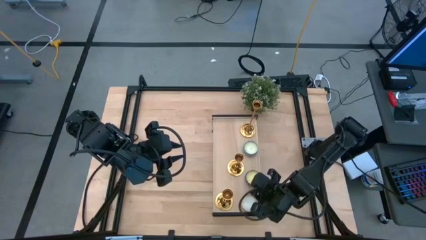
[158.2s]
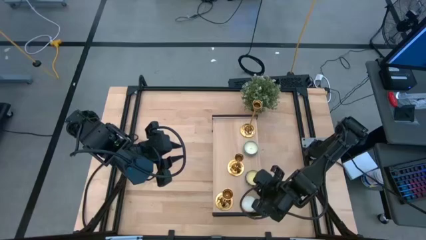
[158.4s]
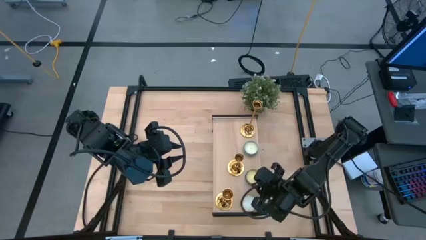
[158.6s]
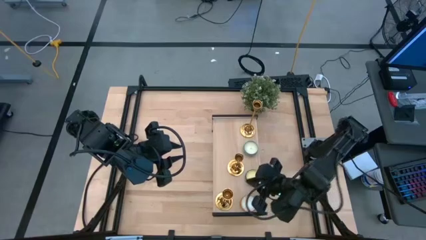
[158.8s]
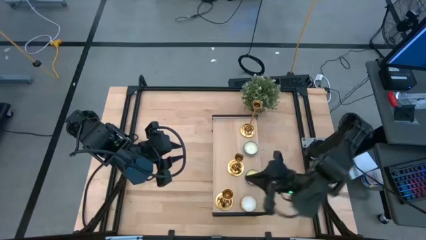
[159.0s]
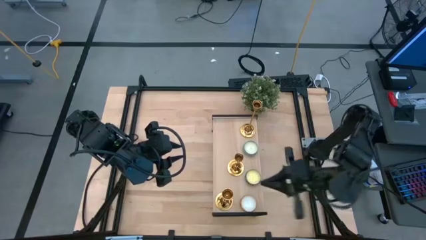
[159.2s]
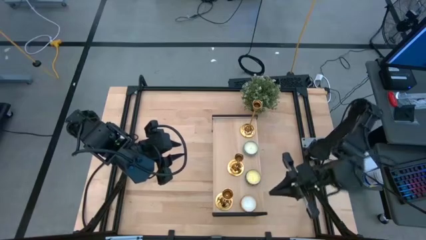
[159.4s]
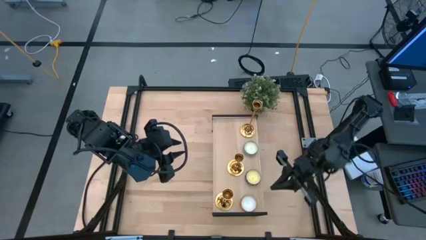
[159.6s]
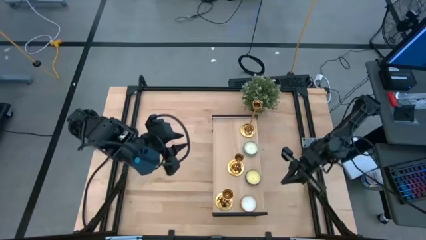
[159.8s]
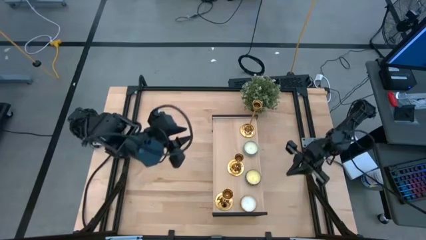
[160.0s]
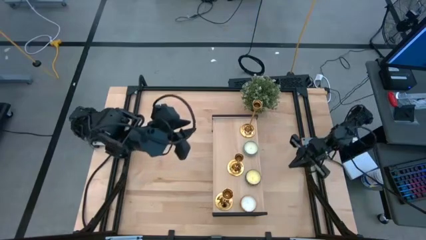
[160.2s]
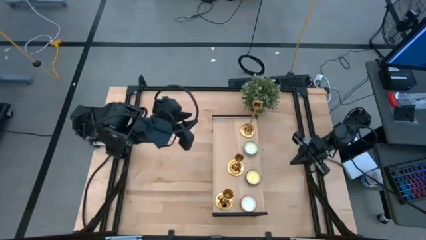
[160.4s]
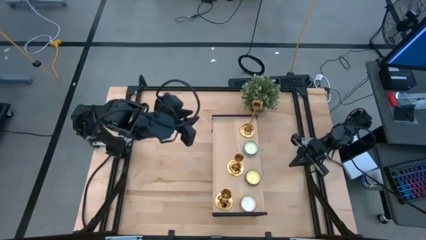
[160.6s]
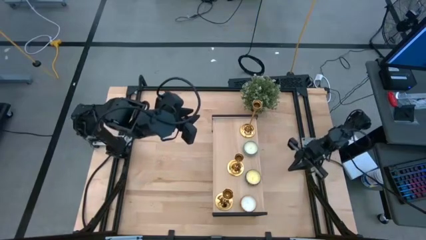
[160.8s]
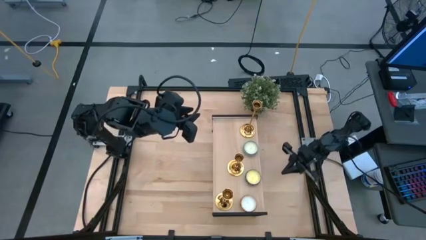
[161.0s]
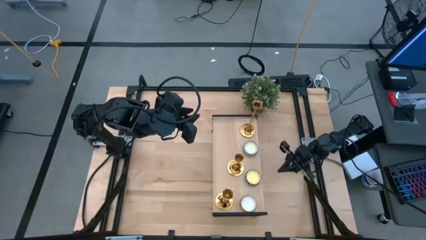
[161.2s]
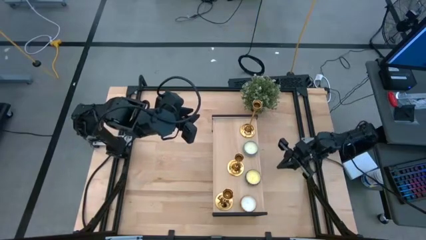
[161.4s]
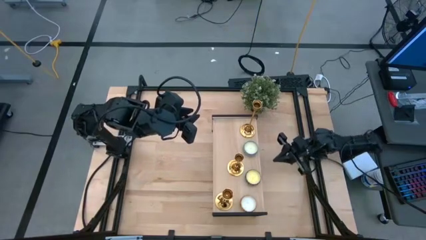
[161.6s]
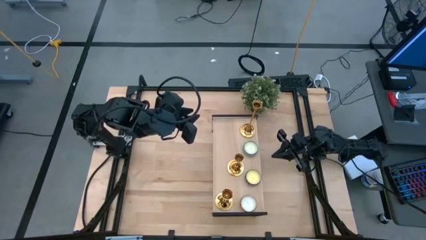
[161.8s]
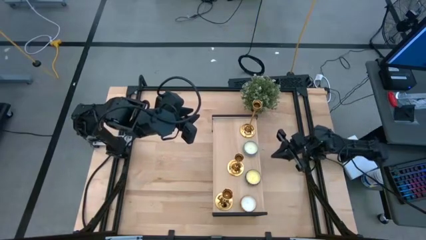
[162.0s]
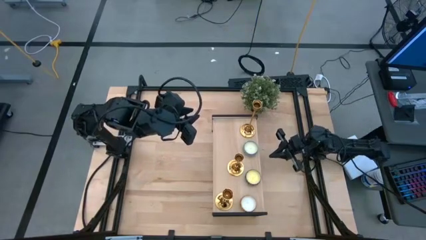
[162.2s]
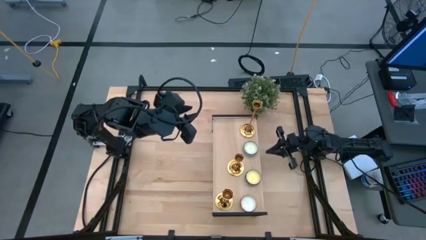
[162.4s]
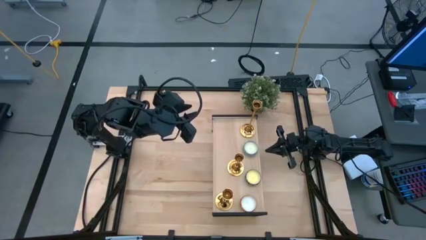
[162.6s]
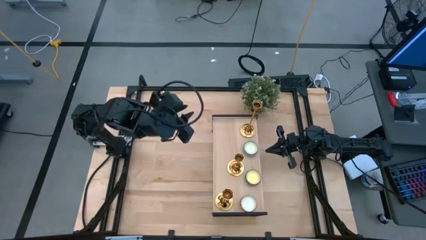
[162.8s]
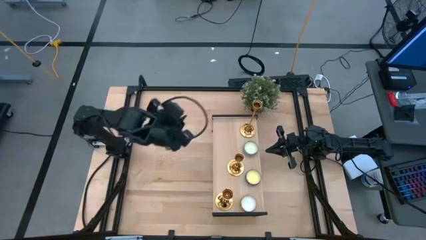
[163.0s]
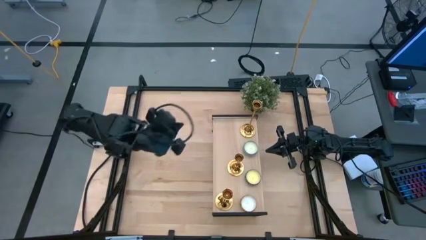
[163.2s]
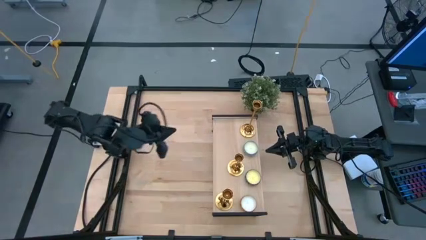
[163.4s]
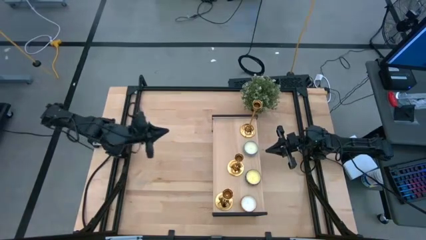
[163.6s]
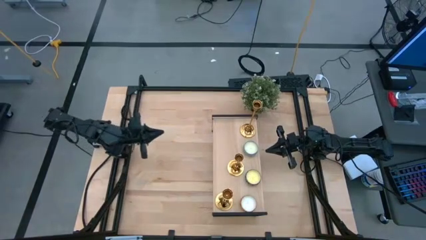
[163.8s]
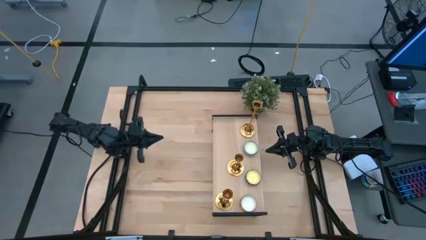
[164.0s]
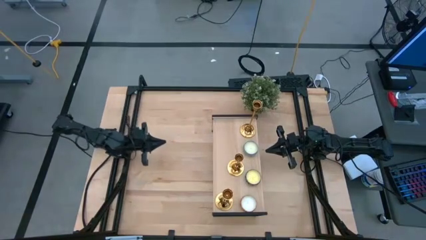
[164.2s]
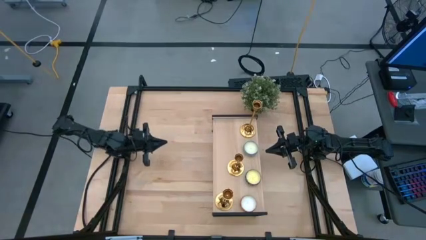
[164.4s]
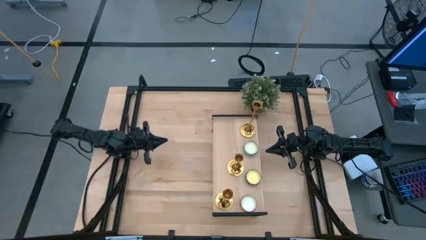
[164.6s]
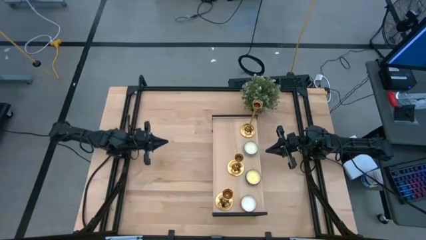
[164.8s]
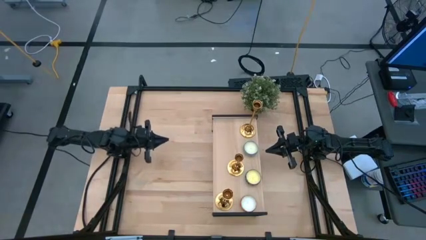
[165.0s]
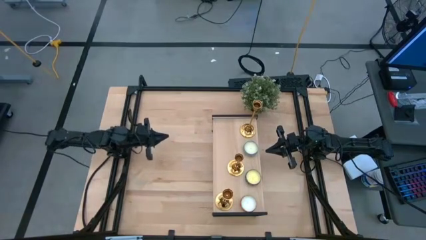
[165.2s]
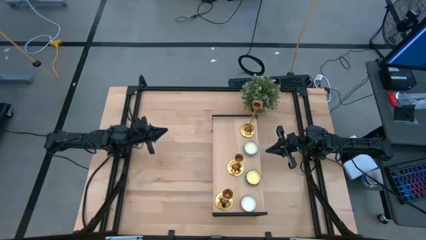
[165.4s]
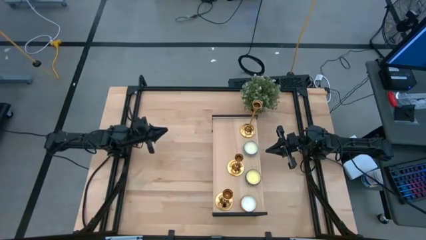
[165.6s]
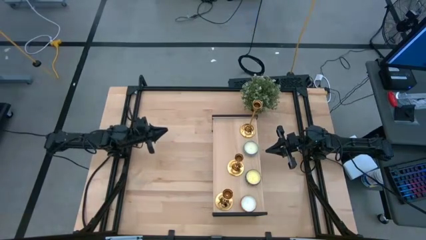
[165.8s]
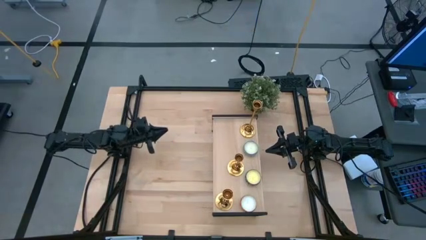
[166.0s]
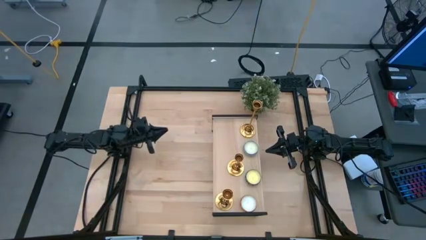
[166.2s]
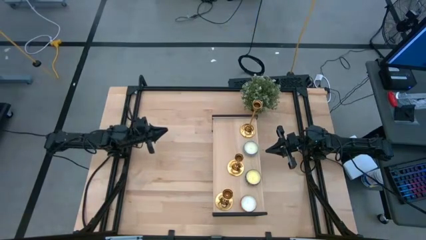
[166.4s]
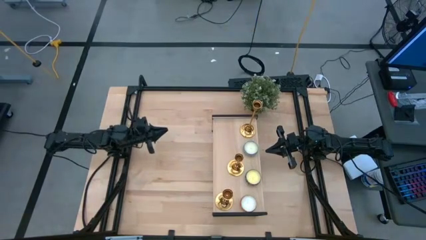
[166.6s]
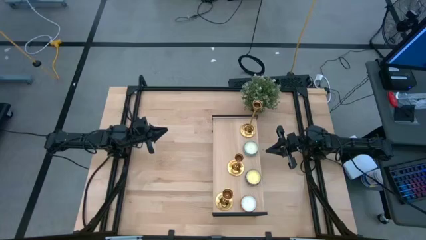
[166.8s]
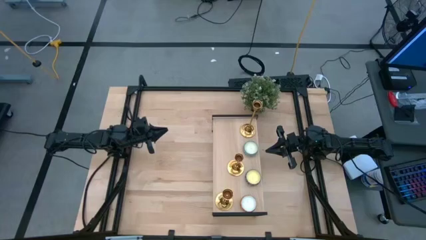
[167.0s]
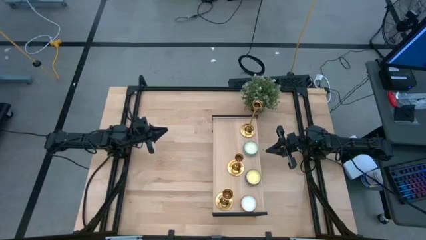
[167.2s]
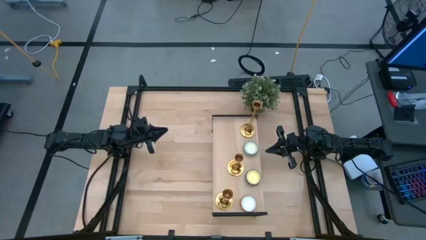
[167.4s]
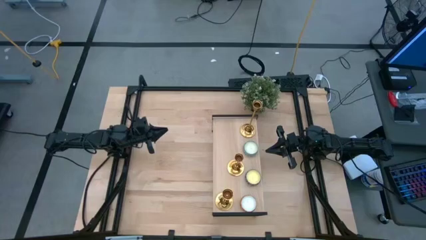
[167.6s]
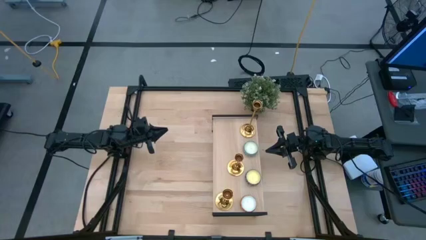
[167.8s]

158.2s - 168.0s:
Task: Pick & Place candle stick holders
Return to Home Position

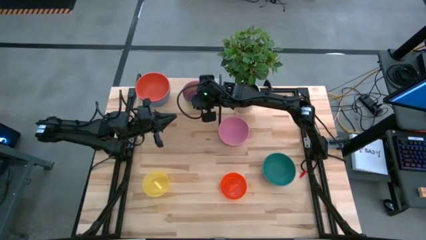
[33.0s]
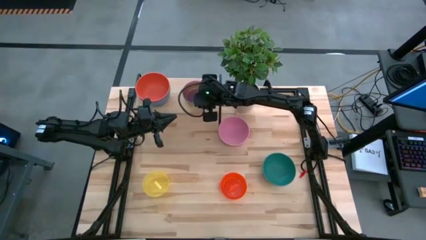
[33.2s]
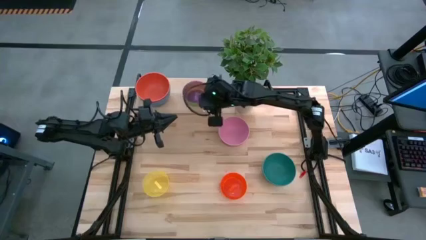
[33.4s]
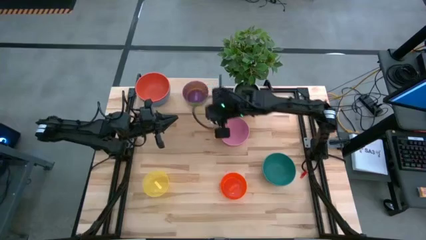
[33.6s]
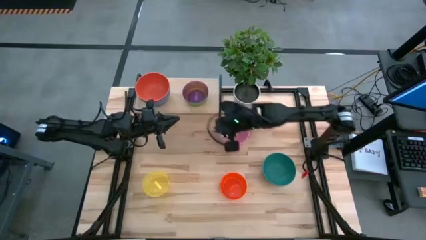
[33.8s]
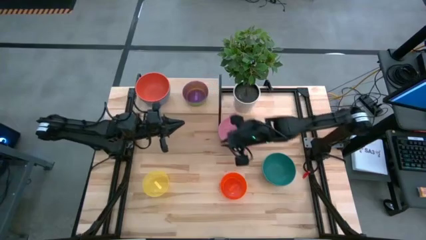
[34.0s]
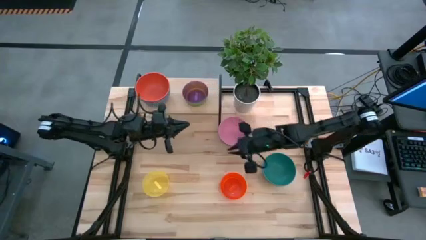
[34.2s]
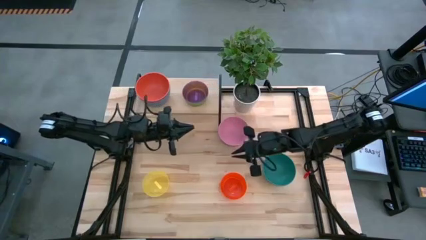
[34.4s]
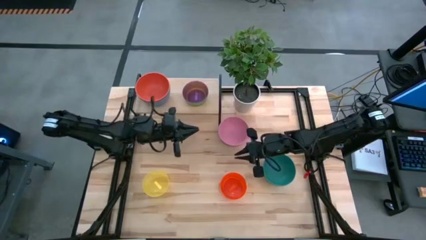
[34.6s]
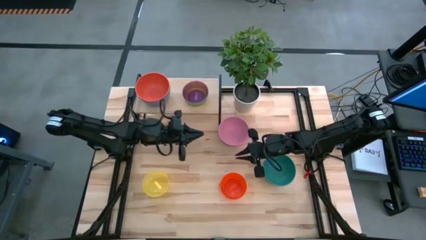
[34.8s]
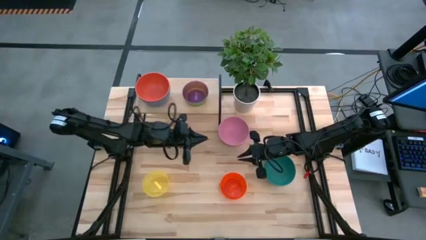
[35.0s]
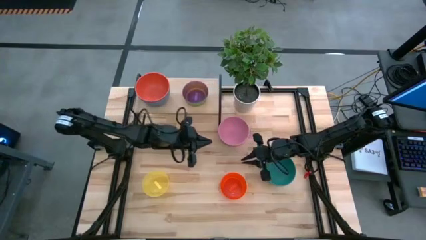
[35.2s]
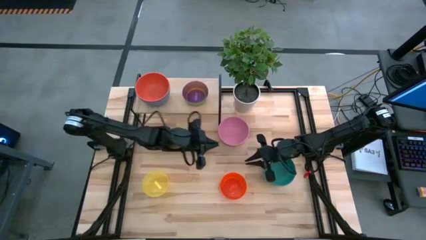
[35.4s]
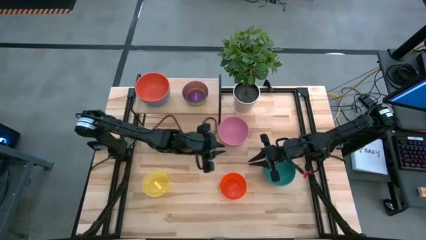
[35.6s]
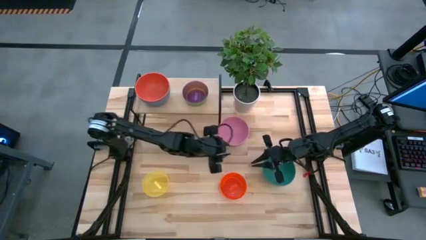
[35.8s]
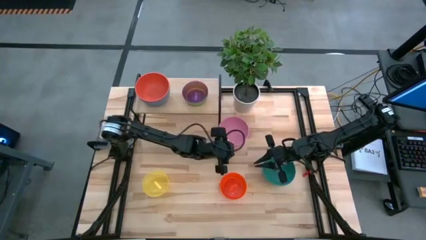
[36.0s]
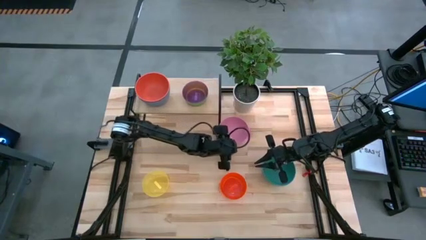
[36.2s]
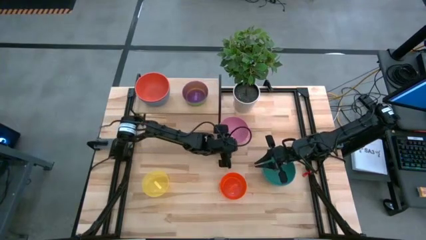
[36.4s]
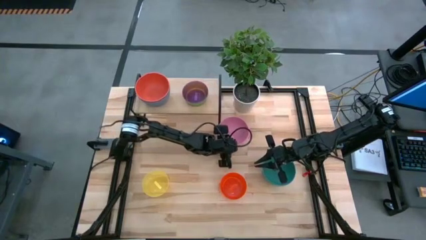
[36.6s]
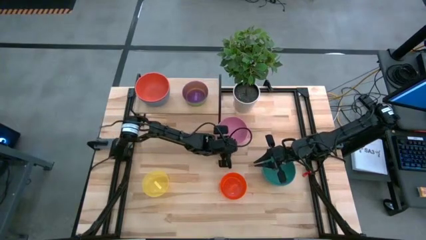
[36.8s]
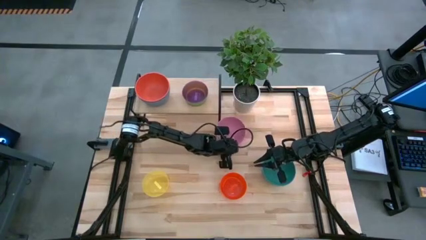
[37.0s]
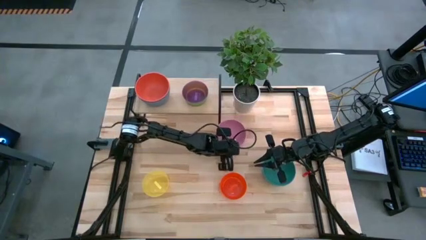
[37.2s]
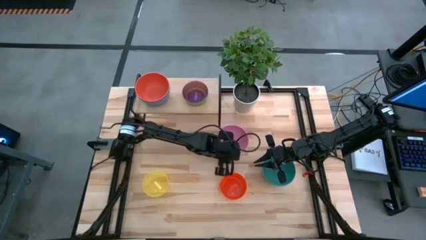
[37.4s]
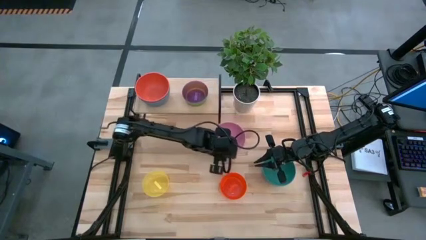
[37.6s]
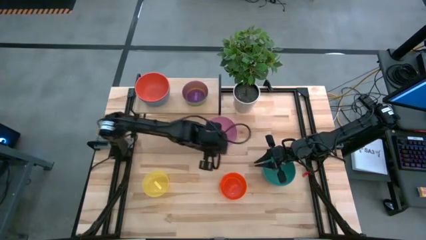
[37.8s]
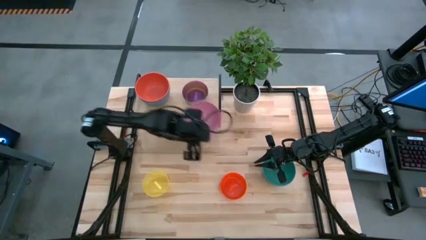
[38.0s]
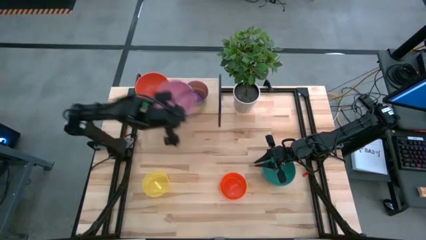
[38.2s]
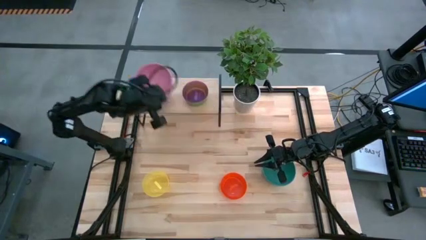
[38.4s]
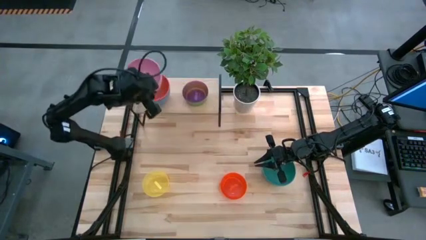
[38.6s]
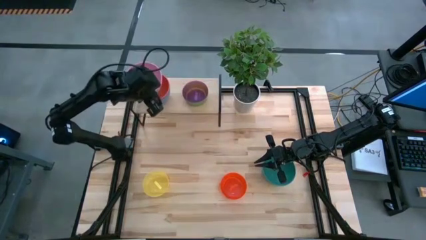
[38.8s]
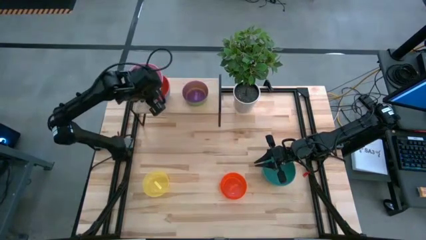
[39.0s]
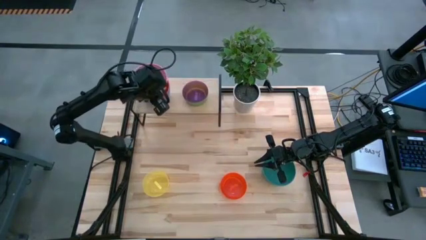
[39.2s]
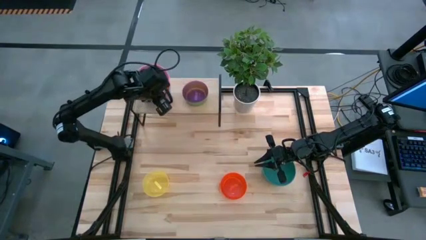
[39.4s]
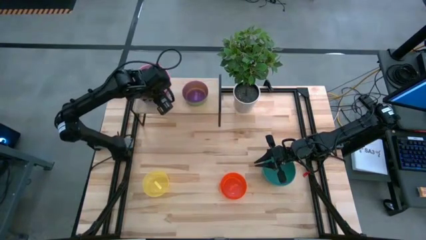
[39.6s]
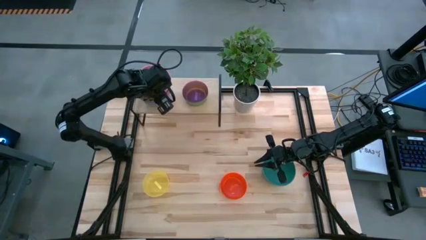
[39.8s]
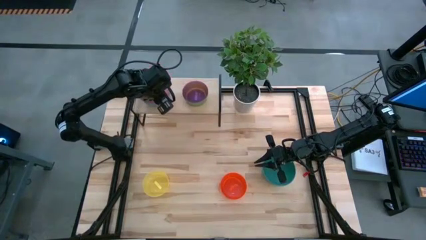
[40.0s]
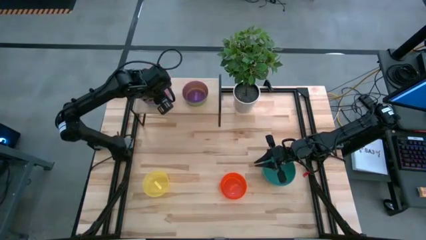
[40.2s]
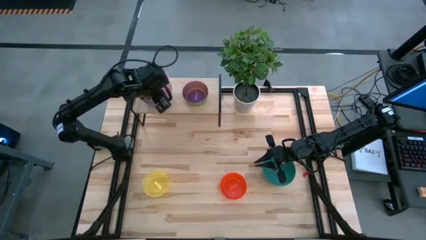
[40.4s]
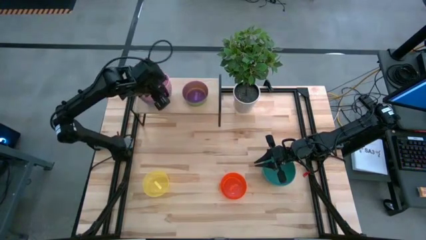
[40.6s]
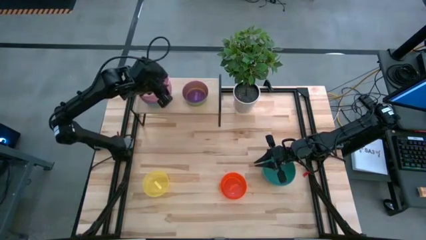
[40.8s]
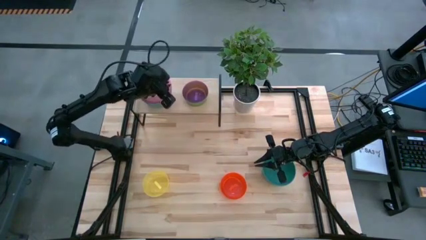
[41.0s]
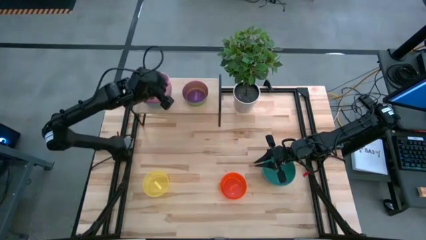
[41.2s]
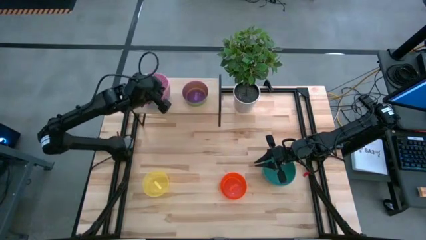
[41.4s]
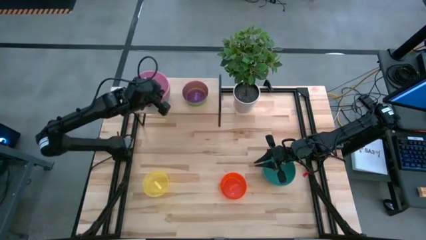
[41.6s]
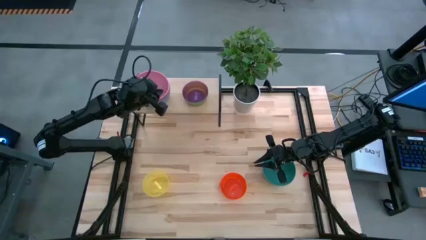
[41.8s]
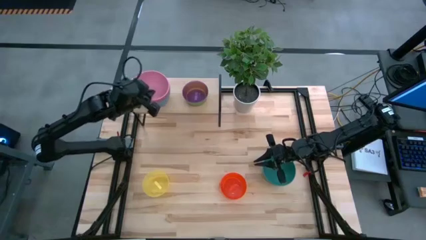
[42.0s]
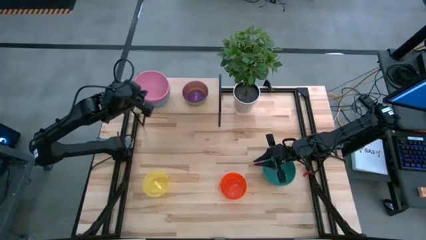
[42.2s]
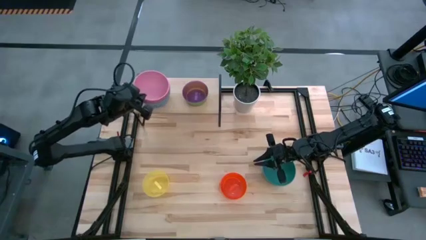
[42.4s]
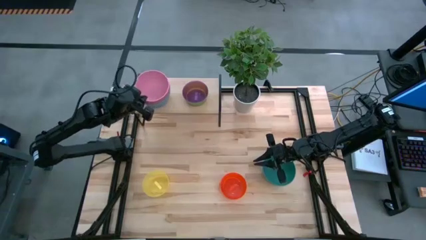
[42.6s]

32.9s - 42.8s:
Task: Place and stack bowls onto a shelf
Stack the pink bowl on top of the orange bowl on the shelf
